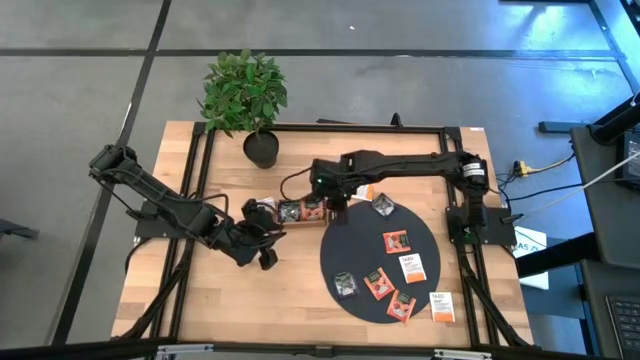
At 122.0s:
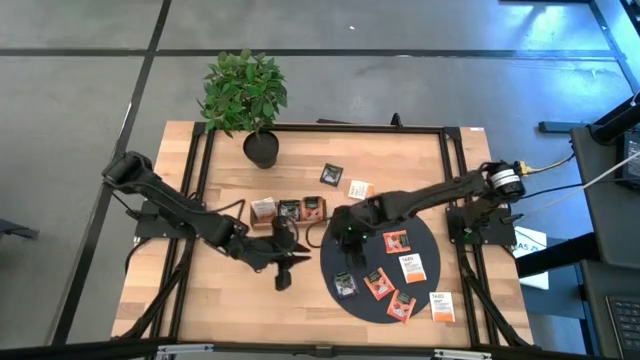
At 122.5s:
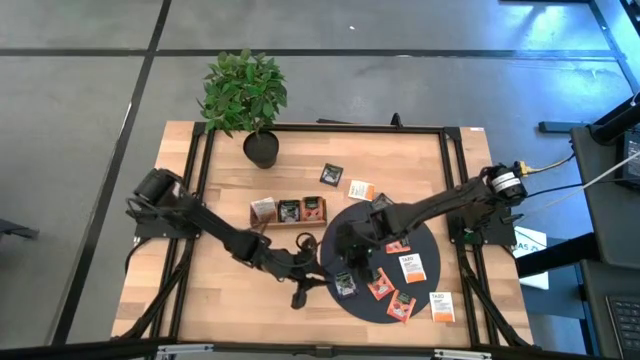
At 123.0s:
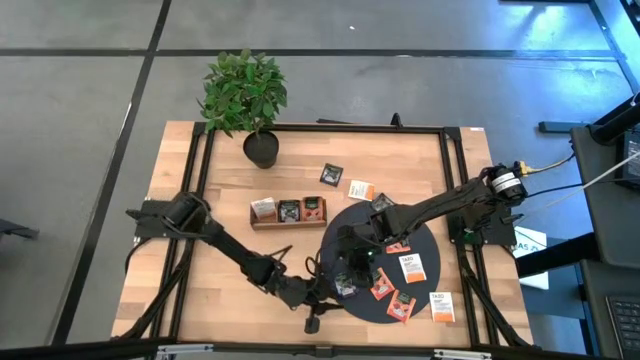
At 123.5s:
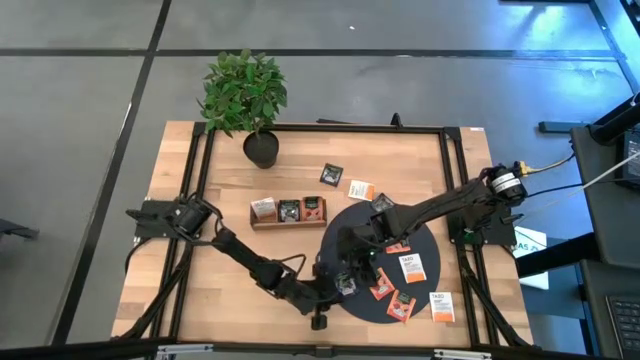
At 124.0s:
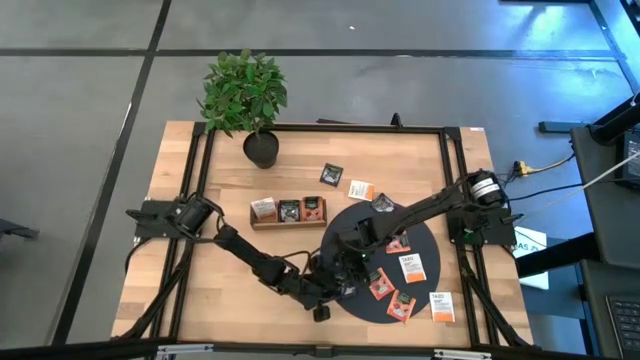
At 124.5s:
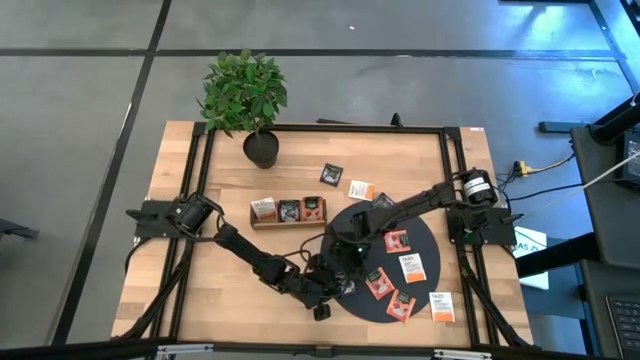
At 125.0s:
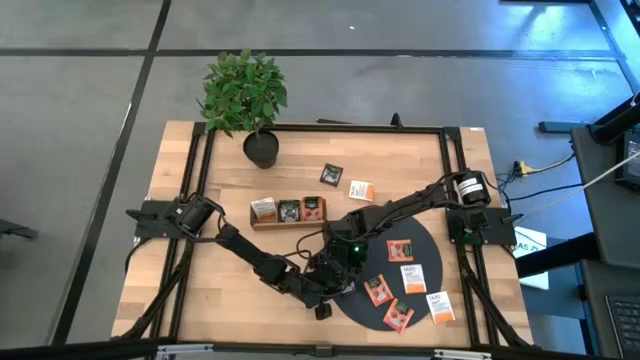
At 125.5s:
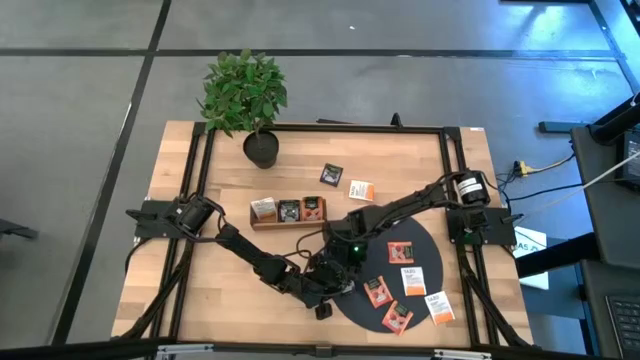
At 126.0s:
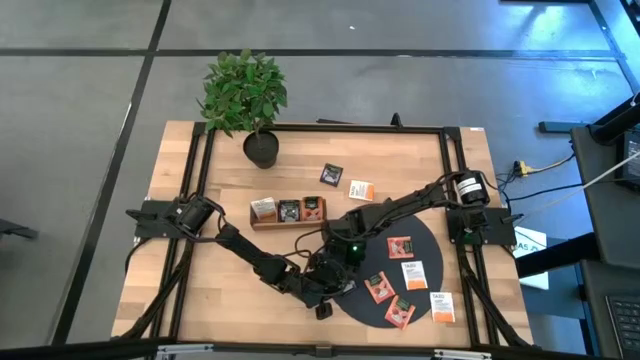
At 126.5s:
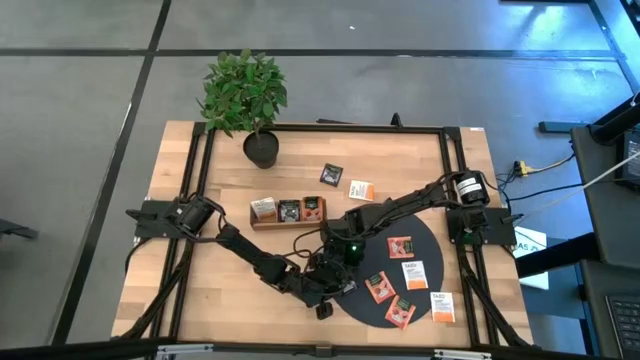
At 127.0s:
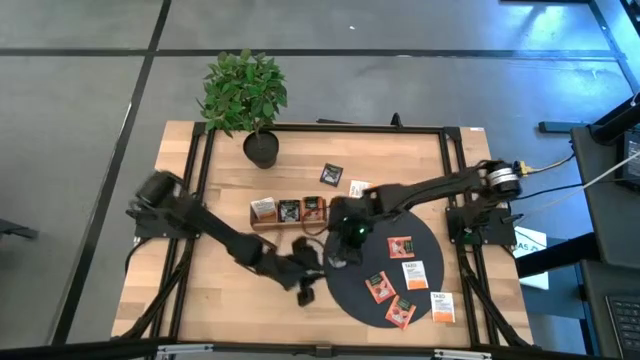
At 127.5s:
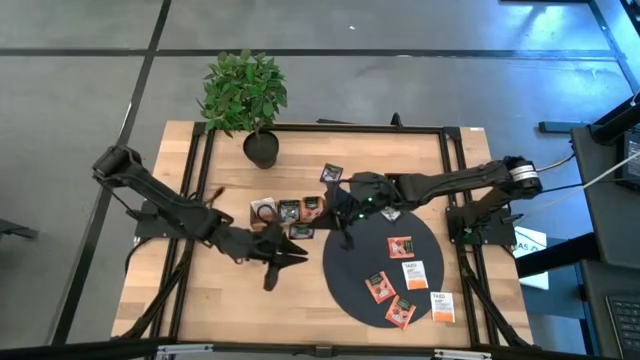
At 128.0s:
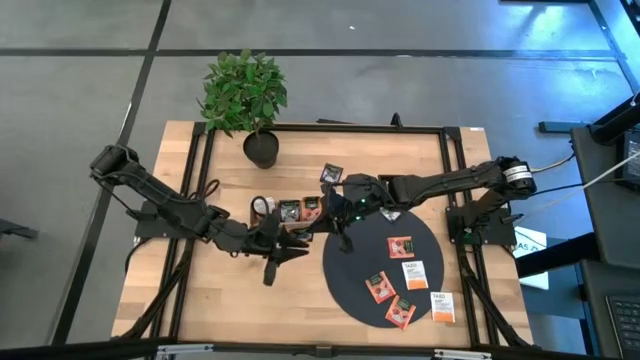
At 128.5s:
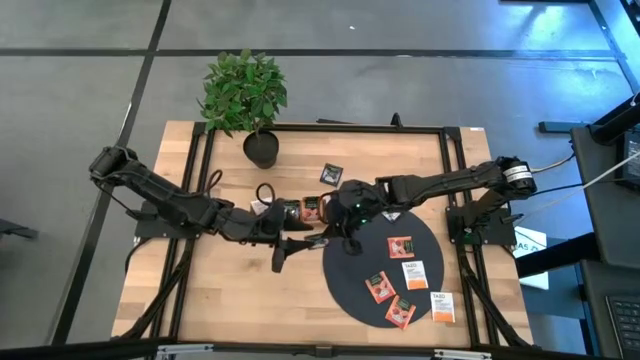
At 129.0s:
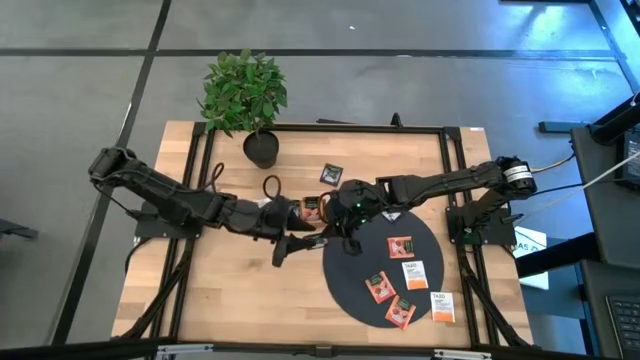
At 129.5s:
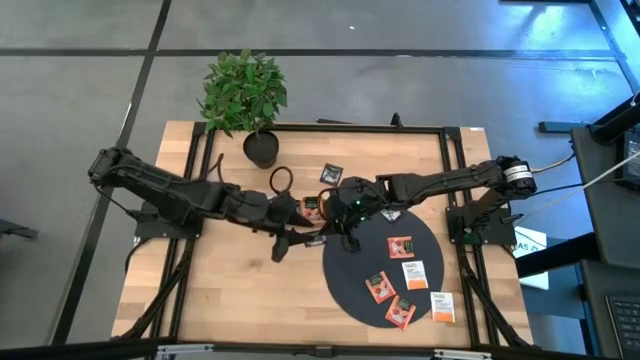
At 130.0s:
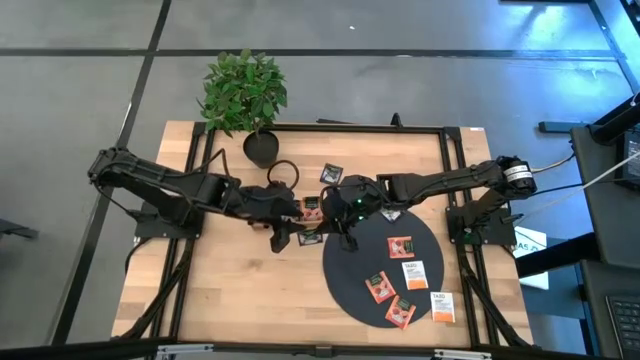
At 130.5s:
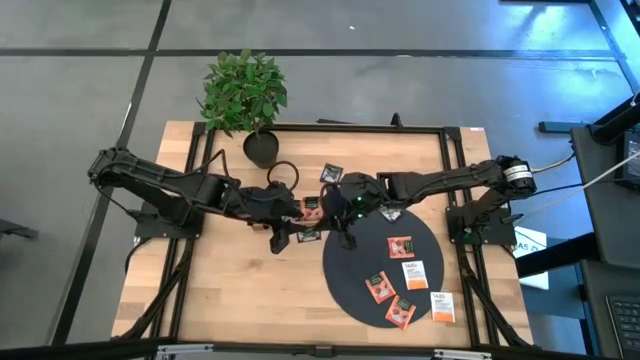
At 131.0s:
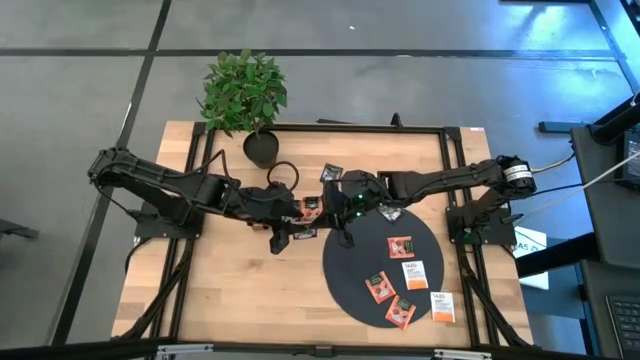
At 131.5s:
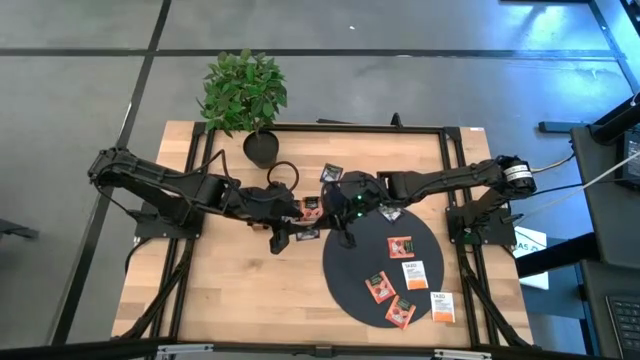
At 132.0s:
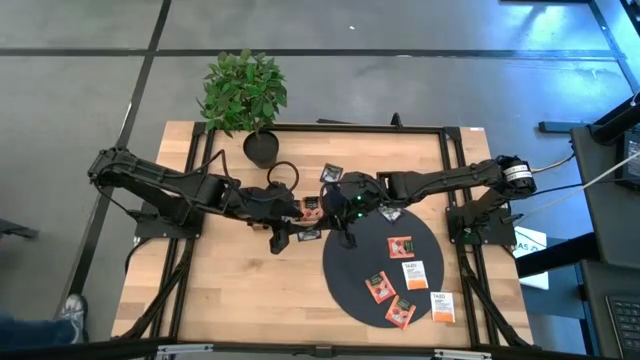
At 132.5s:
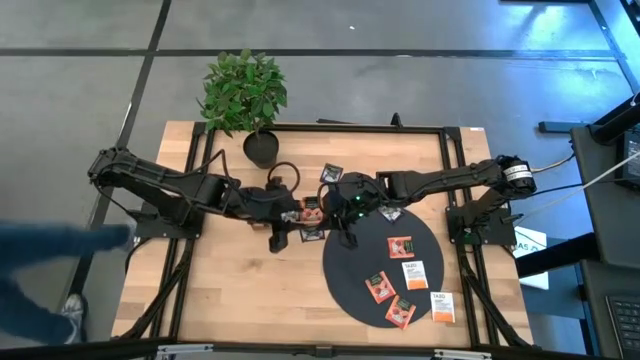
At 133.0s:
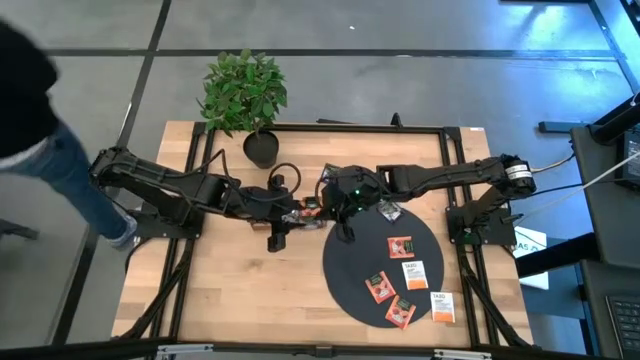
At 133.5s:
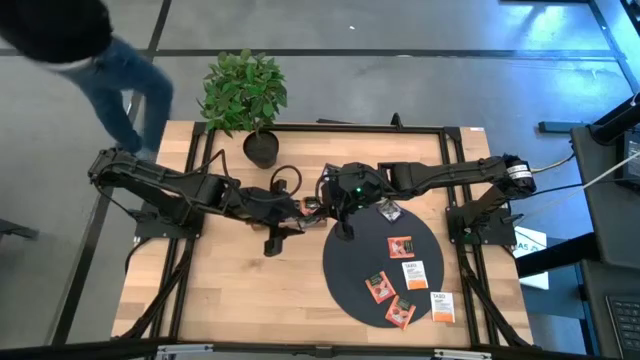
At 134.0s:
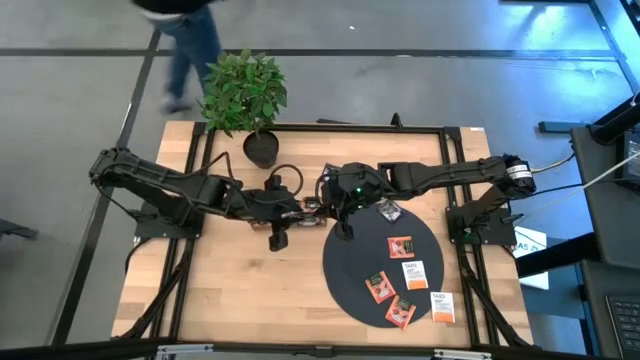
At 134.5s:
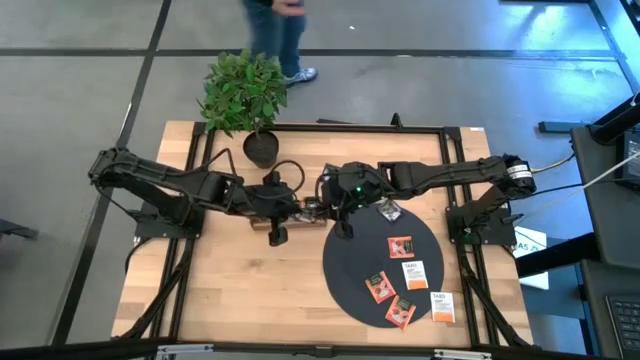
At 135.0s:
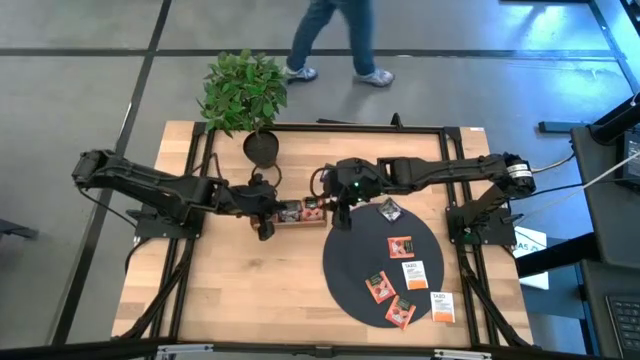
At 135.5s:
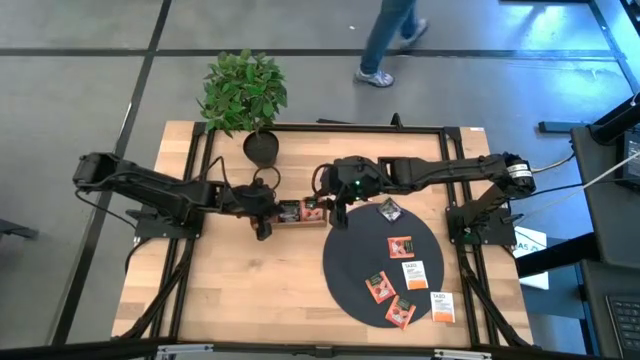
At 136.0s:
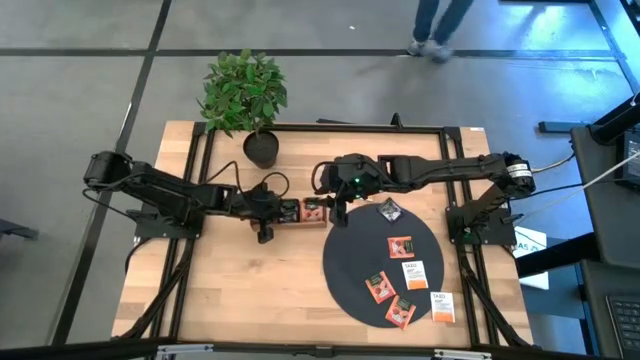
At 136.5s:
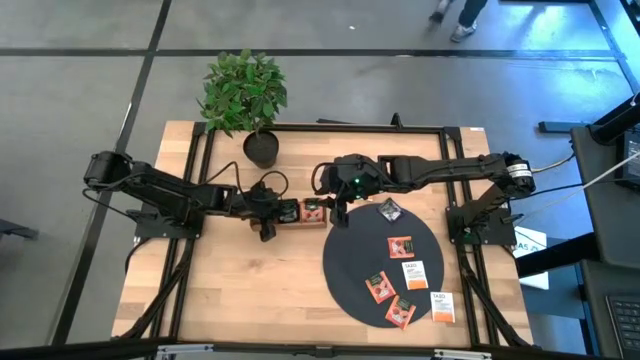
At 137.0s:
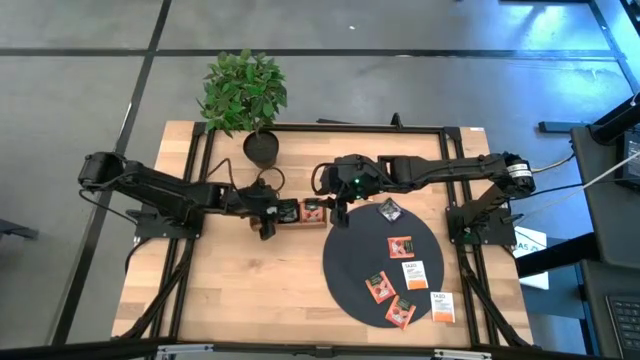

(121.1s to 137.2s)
Task: Pick & Place Tea
Put the bottom purple tea bag into the middle section of the wooden organizer

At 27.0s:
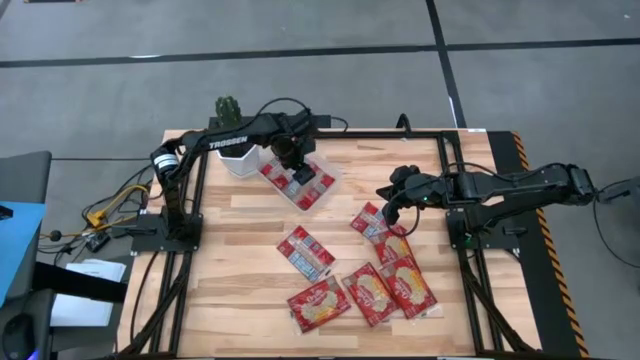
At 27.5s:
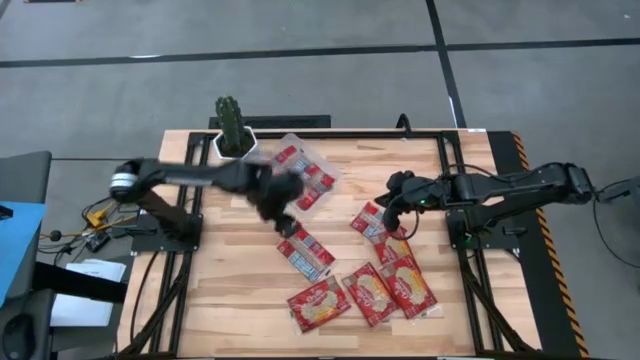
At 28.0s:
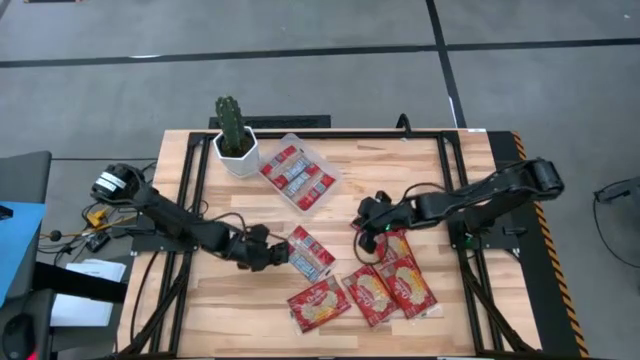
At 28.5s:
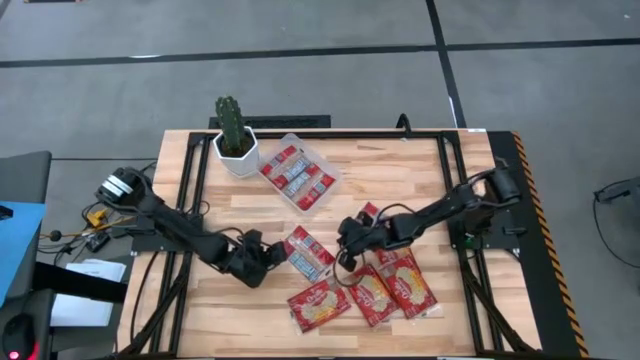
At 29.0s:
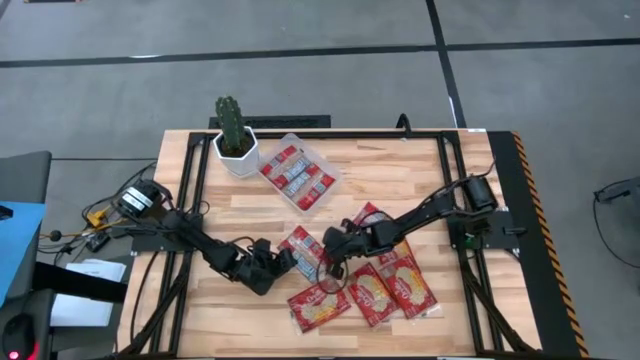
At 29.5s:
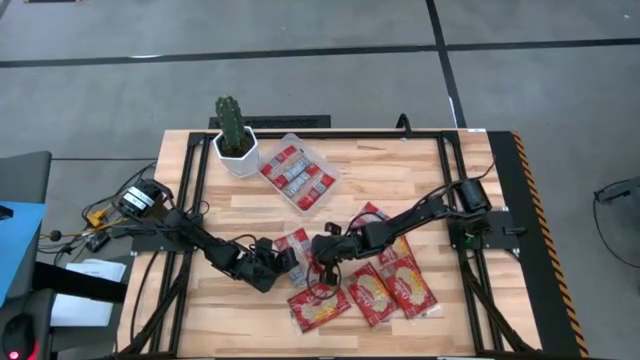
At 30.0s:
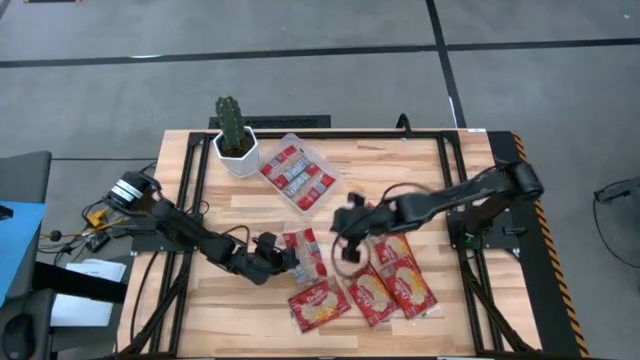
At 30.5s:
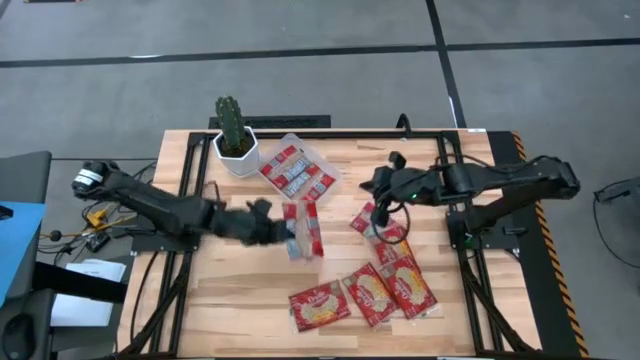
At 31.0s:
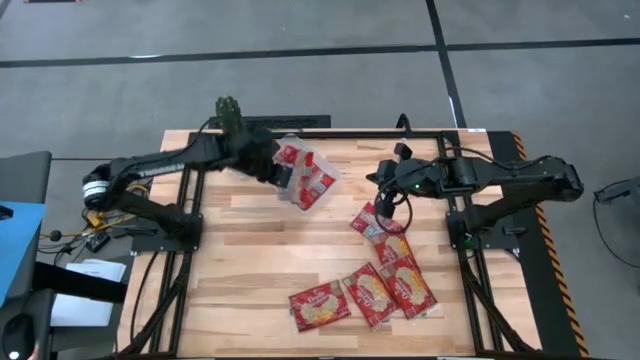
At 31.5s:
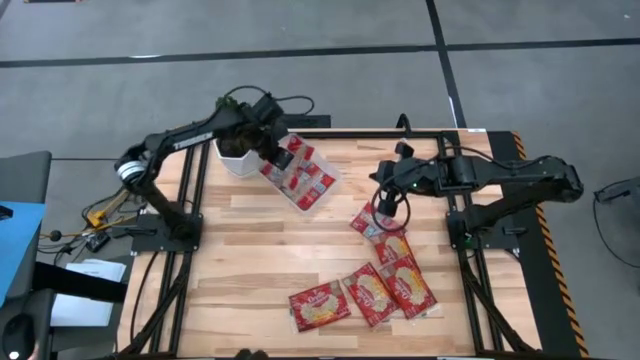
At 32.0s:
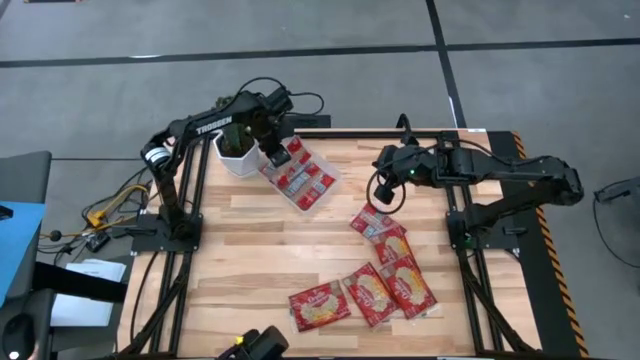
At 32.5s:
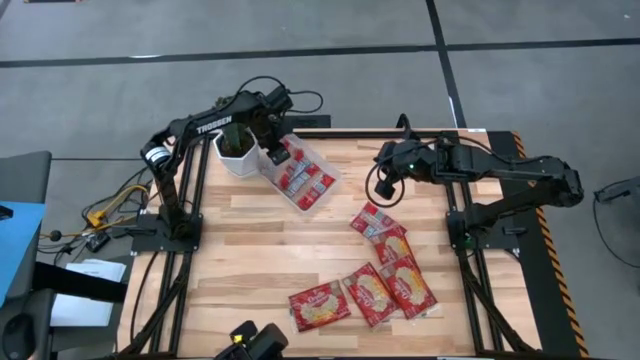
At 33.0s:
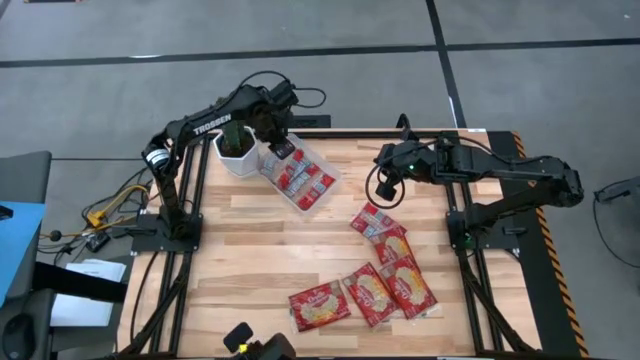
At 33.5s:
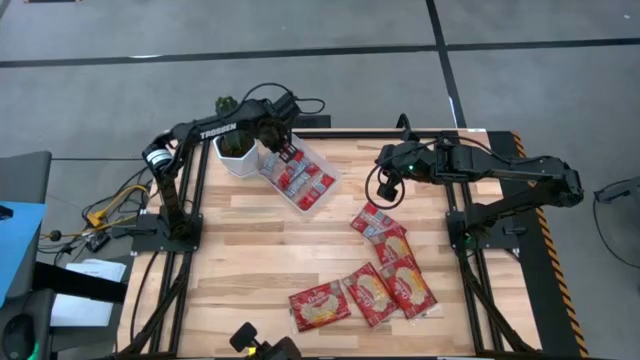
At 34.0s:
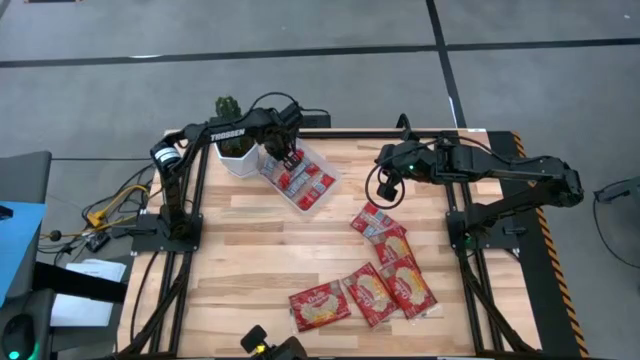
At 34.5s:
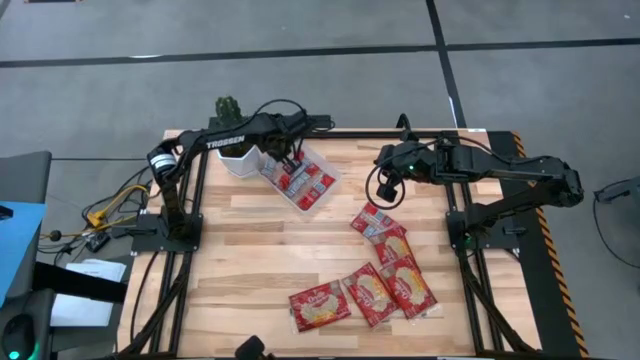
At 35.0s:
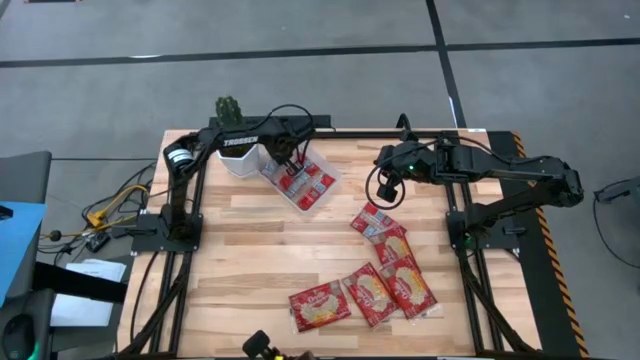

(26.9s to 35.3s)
Task: Sort popcorn bags into baskets
Put the red popcorn bag into the transparent bin
